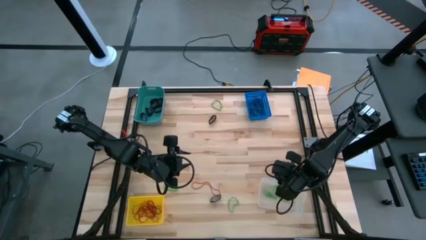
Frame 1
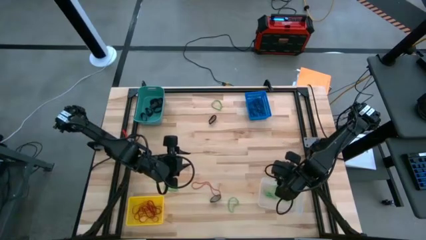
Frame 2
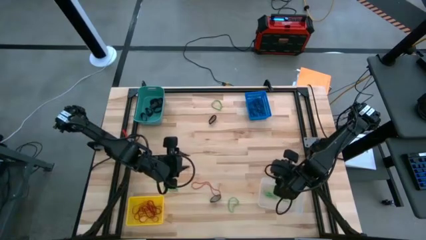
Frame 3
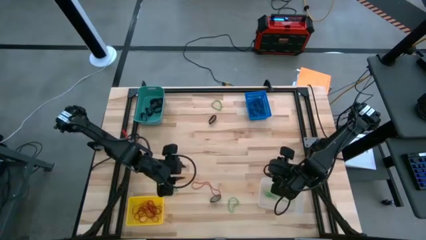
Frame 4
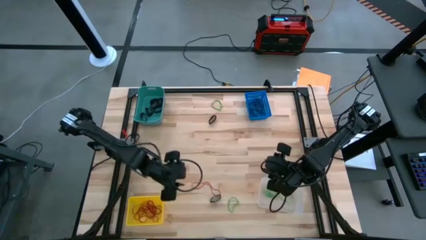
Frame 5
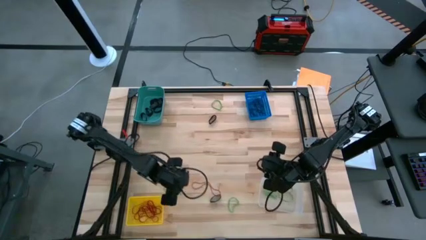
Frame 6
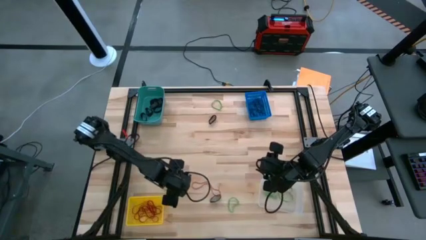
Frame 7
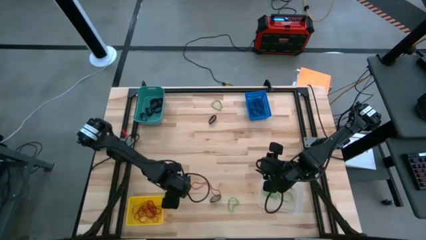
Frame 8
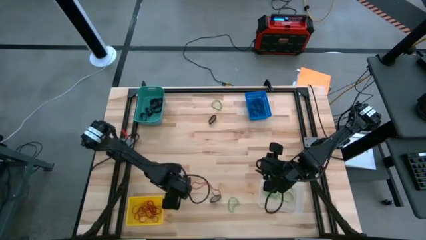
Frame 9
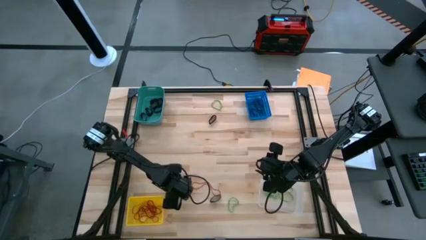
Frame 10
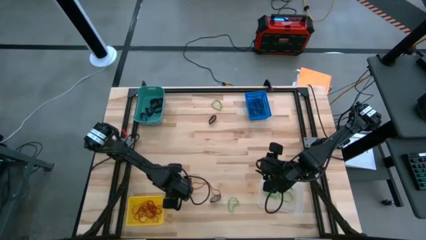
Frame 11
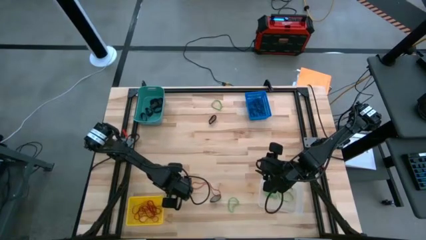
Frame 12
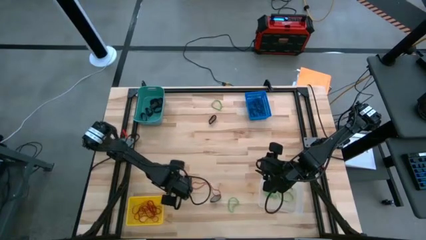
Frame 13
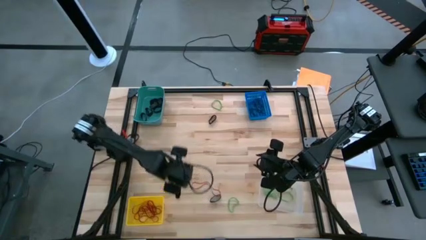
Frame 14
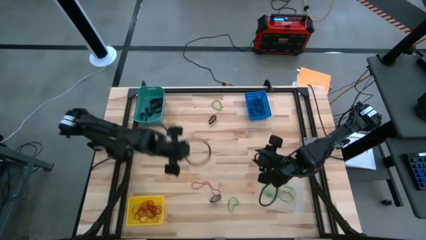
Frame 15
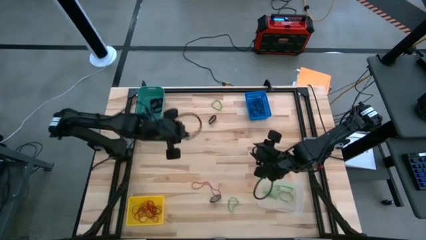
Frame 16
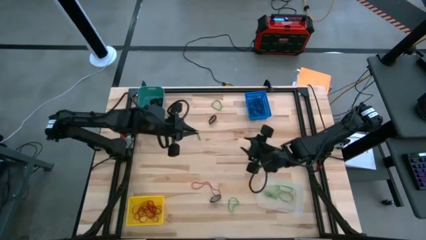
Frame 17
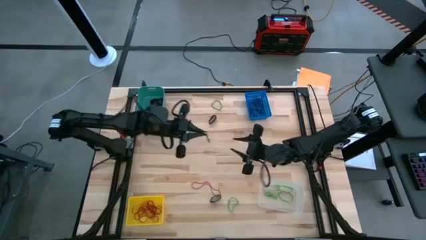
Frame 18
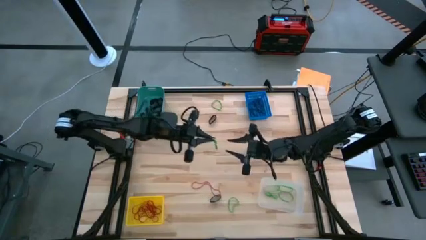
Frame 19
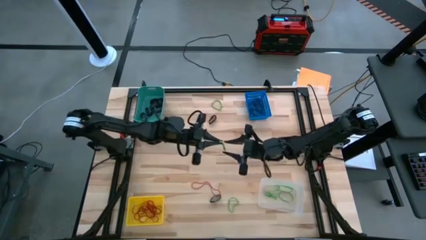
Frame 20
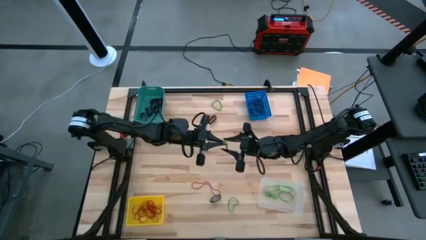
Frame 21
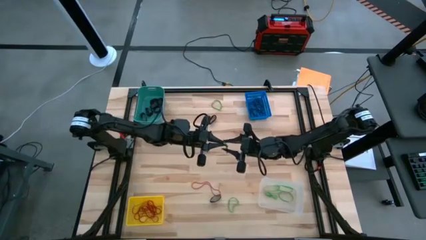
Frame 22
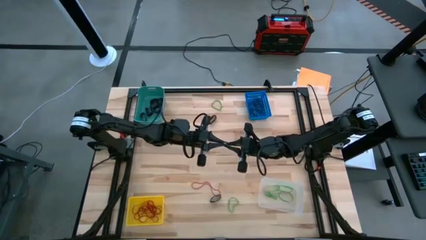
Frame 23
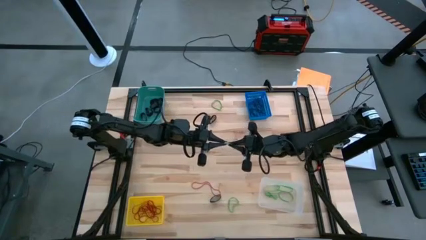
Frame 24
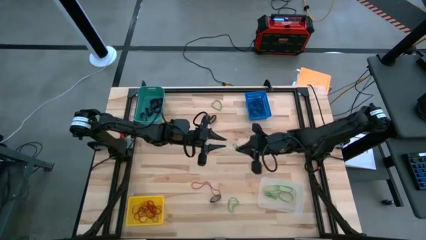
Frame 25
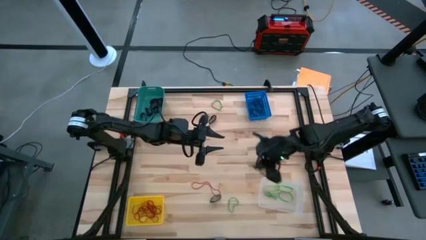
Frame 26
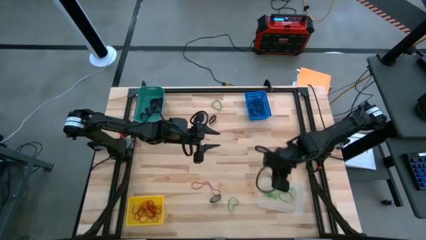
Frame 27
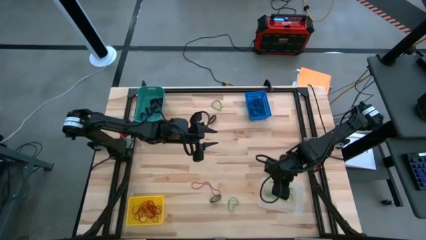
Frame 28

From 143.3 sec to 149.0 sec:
Task: Sort rubber bands into baskets
Put the green rubber band into the transparent bin

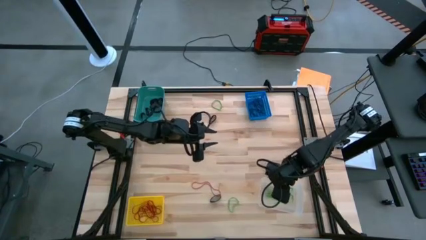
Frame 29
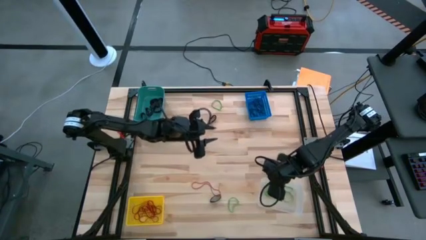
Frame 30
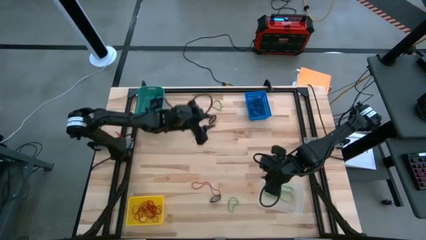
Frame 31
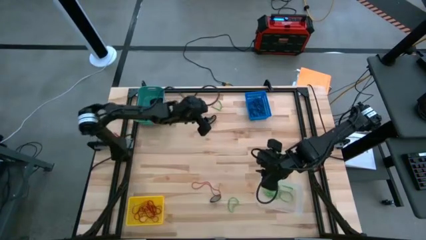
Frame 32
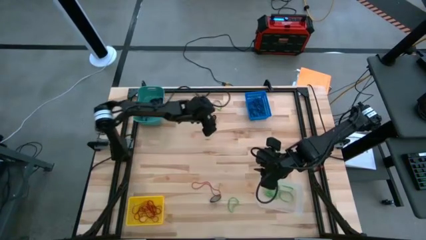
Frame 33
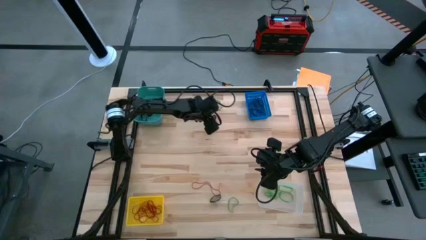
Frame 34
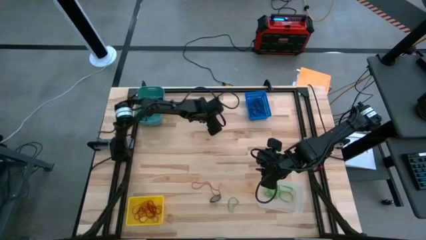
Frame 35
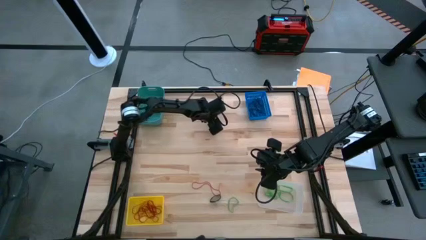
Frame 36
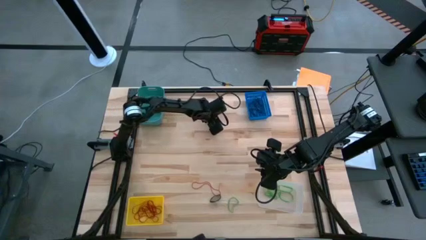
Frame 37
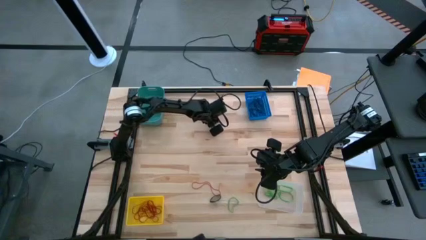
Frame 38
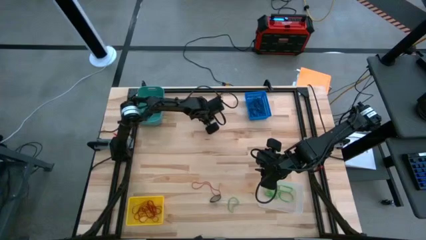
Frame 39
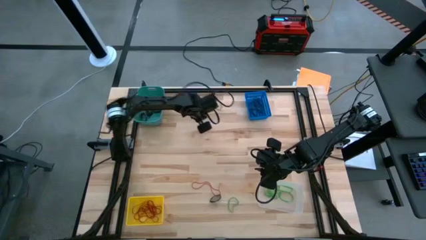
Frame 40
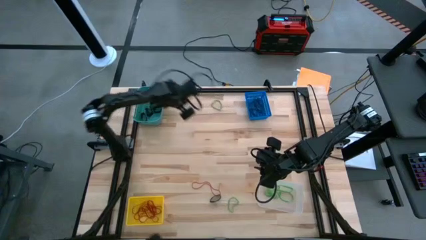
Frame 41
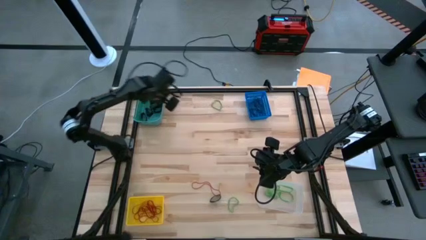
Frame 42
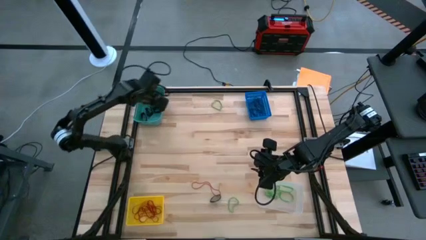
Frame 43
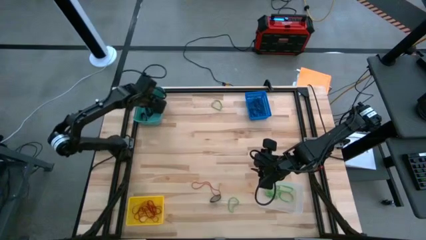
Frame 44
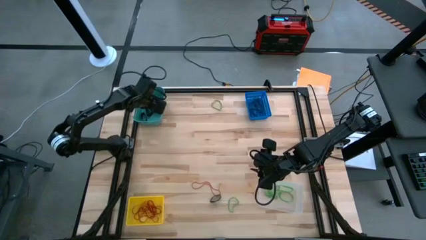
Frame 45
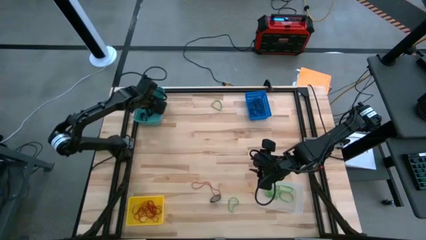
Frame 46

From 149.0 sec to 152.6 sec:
Put the thick black rubber band into the light blue bin

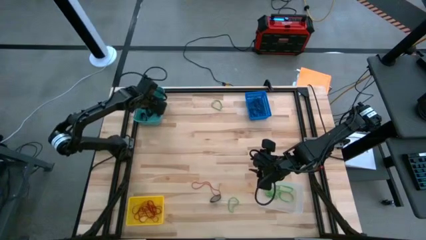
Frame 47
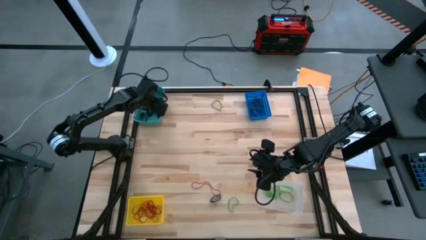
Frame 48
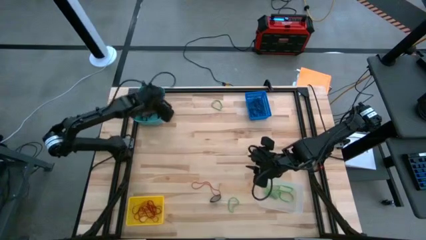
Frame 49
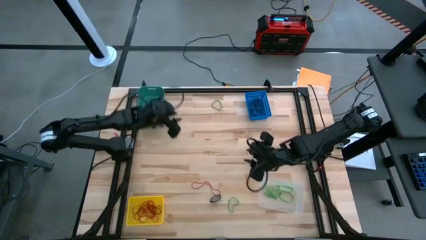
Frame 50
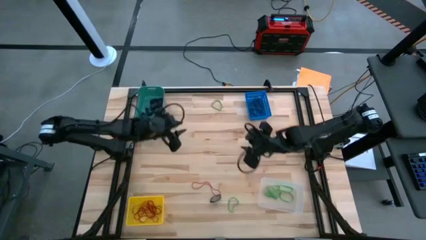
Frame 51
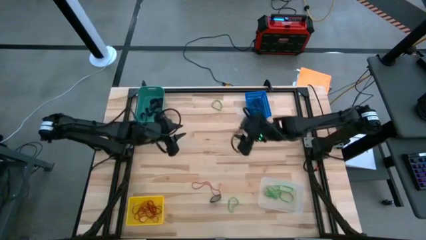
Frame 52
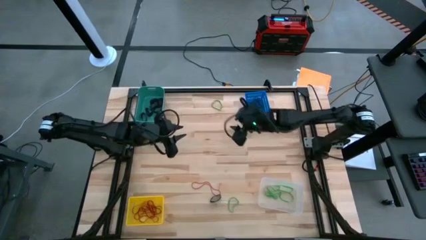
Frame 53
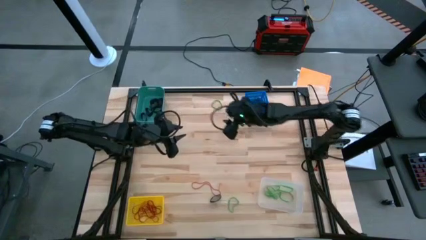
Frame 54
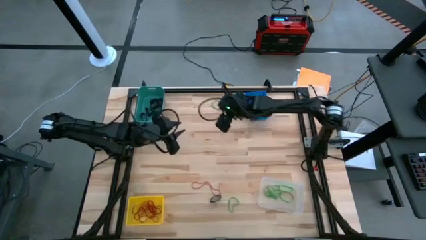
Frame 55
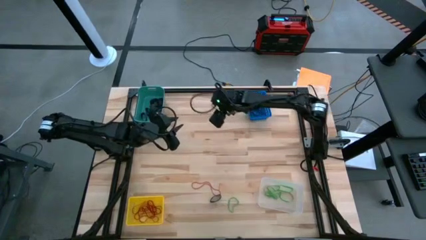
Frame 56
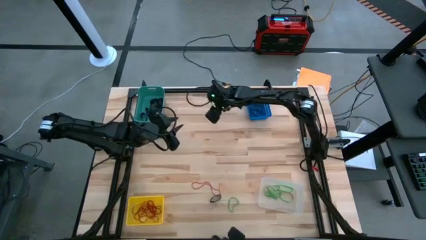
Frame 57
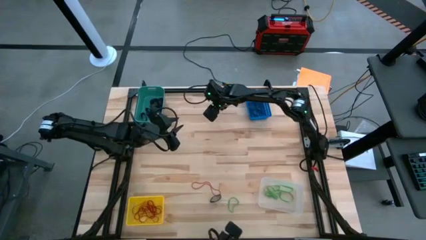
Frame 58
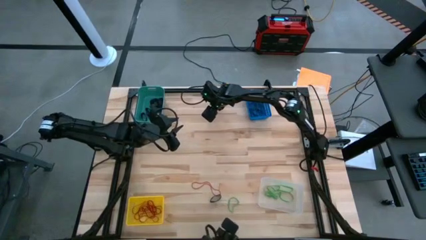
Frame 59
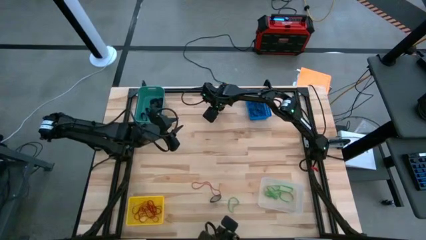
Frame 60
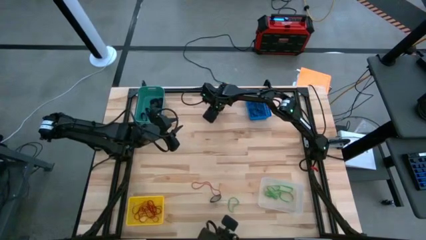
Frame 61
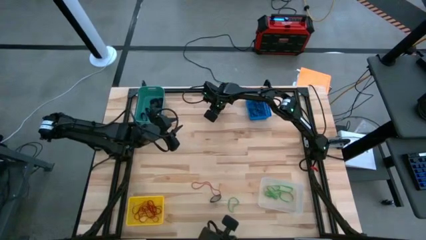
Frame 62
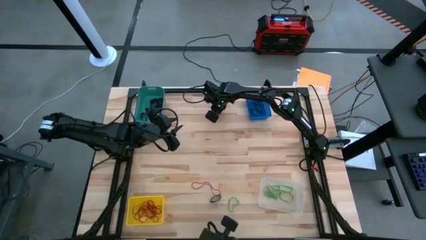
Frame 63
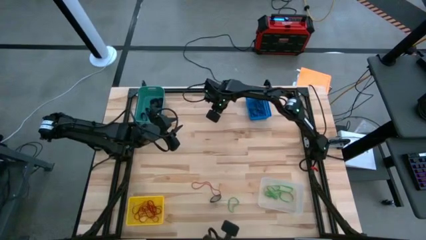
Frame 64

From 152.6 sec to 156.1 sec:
Put the green rubber band into the transparent bin

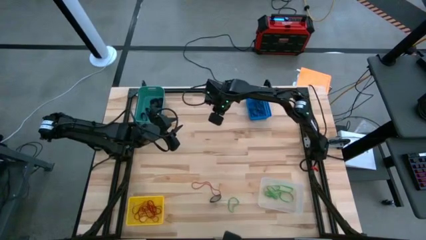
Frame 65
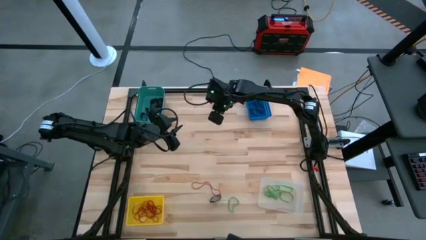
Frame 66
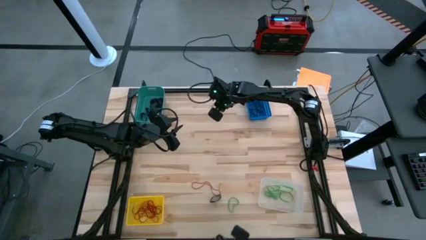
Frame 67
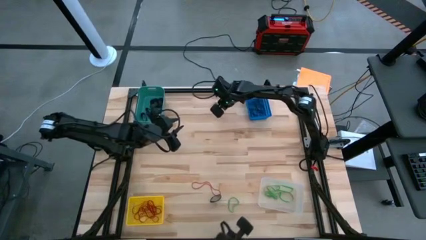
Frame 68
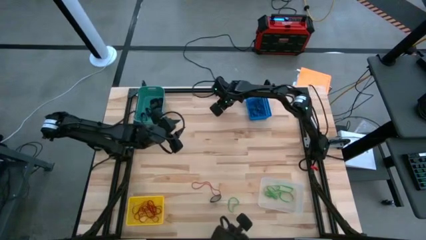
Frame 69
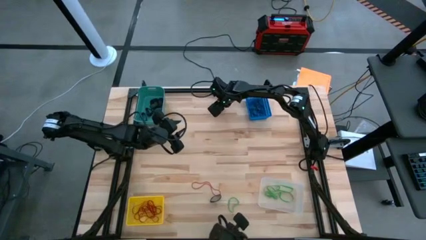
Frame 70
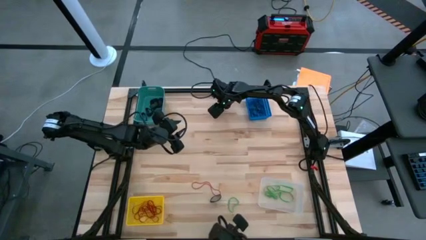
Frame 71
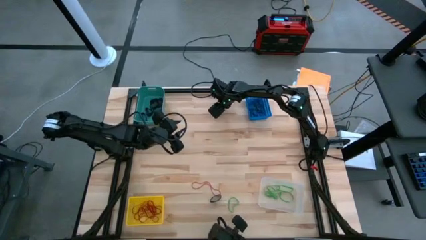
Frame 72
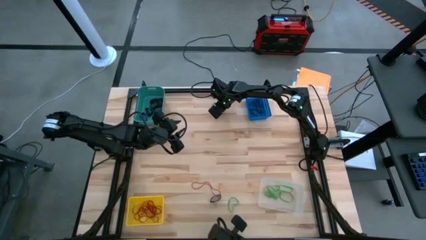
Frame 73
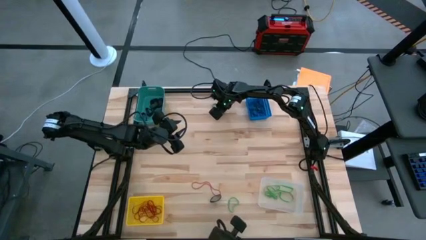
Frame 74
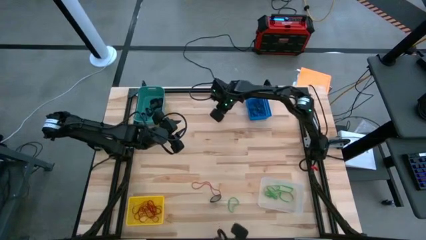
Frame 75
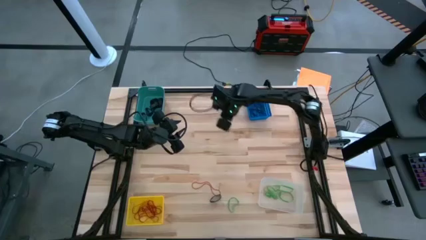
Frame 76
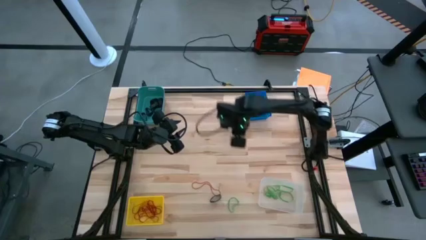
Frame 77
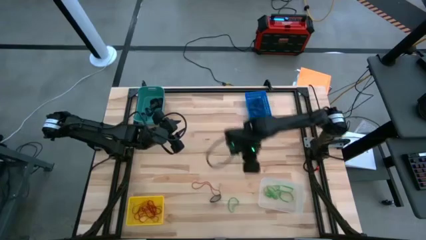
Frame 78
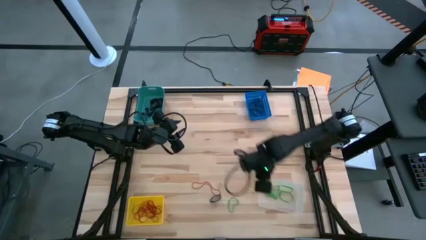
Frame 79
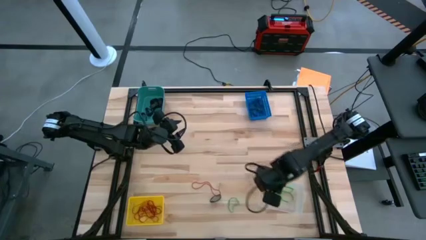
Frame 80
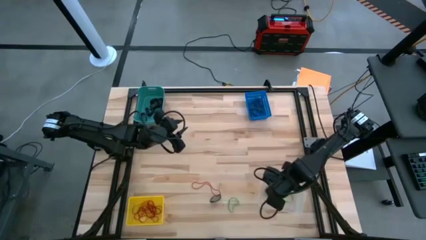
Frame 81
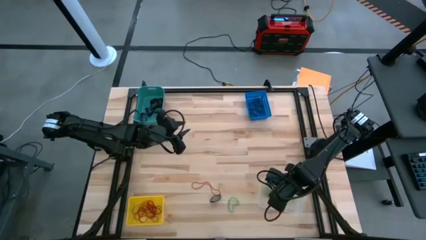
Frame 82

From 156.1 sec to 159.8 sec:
Put the green rubber band into the transparent bin
